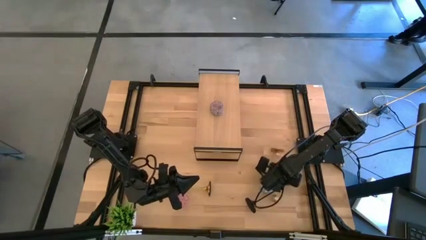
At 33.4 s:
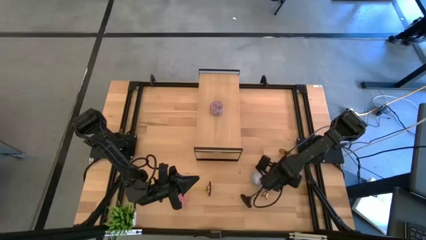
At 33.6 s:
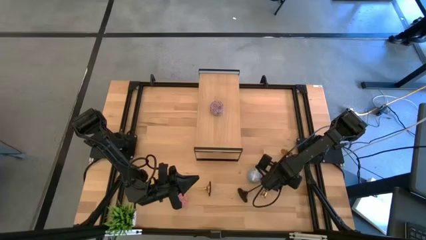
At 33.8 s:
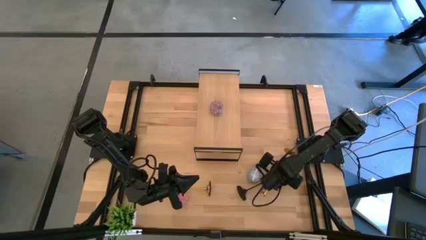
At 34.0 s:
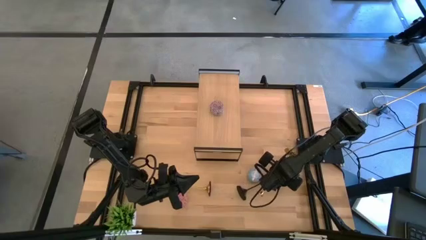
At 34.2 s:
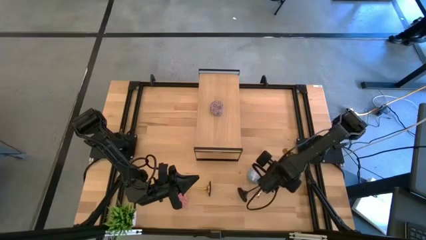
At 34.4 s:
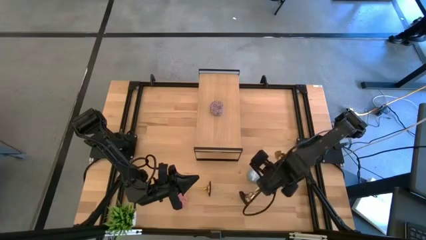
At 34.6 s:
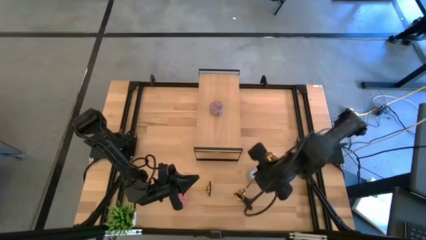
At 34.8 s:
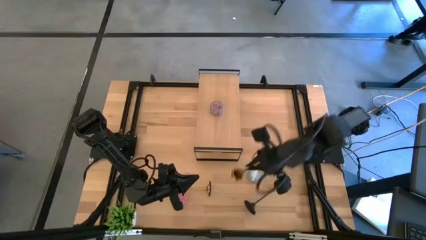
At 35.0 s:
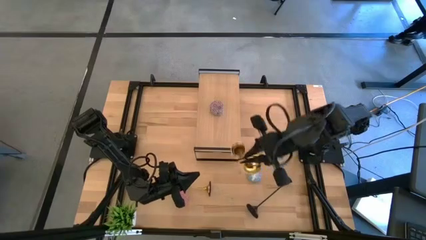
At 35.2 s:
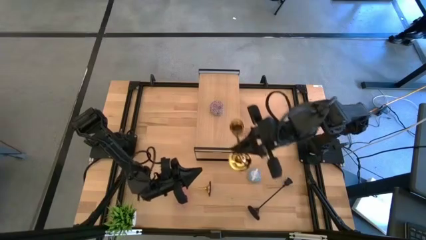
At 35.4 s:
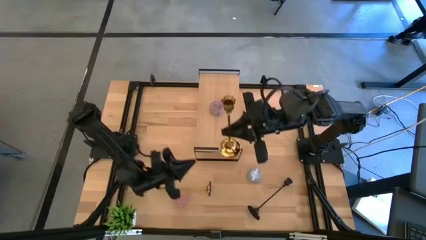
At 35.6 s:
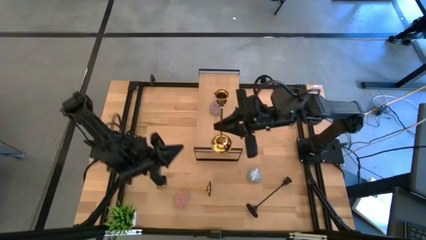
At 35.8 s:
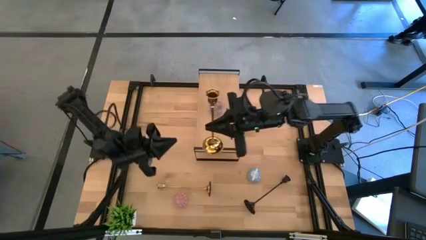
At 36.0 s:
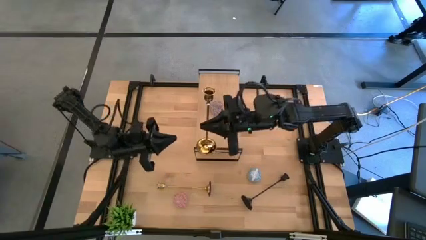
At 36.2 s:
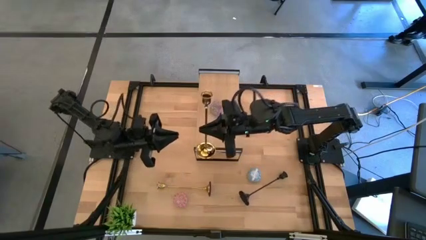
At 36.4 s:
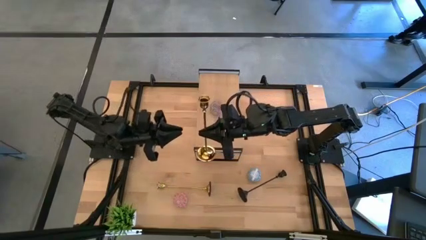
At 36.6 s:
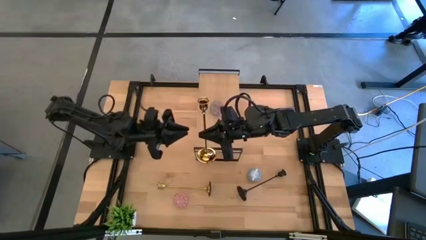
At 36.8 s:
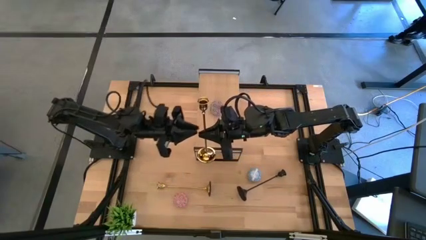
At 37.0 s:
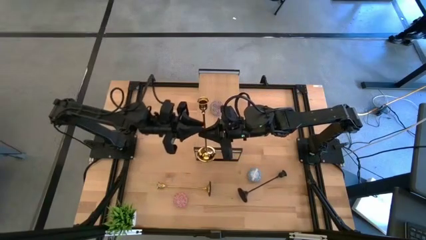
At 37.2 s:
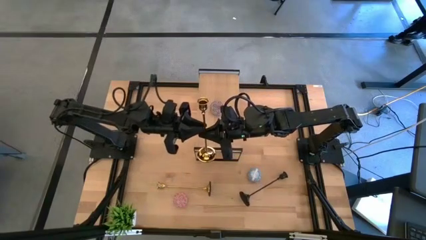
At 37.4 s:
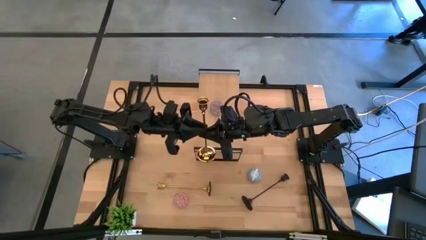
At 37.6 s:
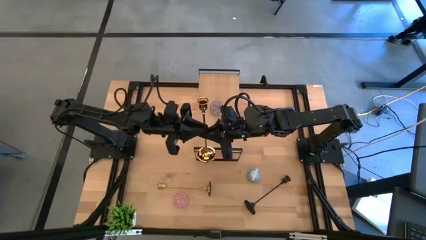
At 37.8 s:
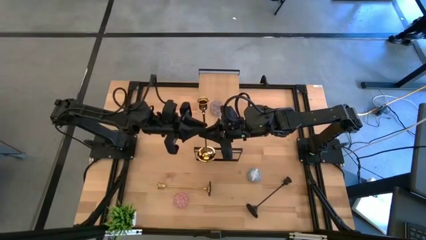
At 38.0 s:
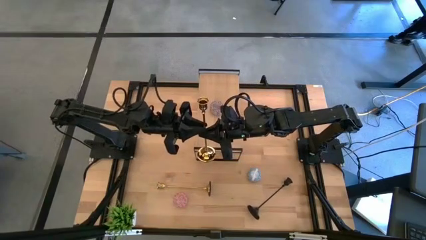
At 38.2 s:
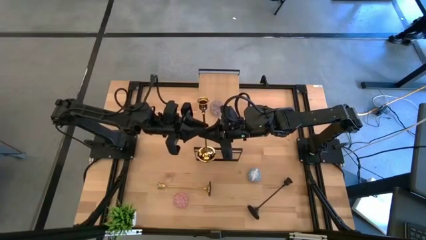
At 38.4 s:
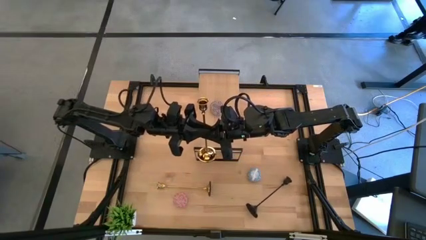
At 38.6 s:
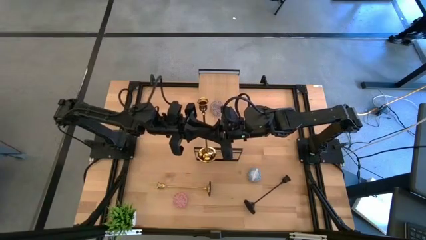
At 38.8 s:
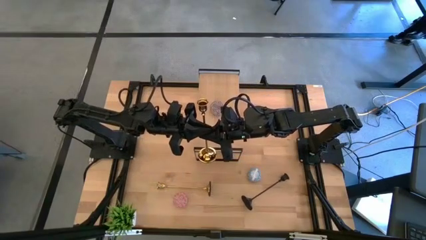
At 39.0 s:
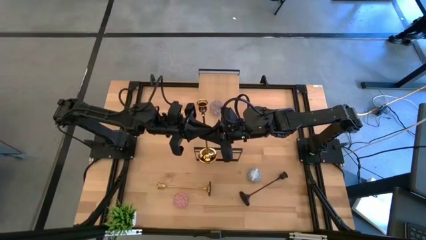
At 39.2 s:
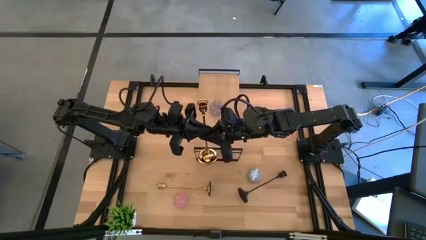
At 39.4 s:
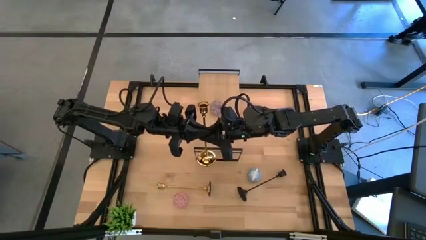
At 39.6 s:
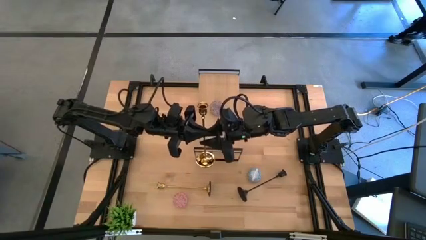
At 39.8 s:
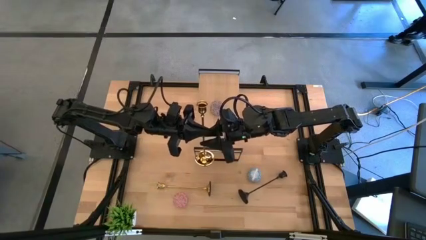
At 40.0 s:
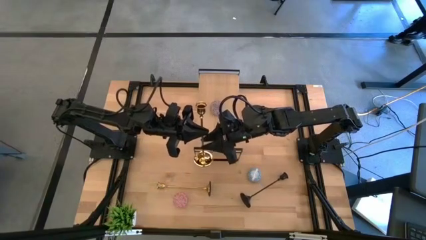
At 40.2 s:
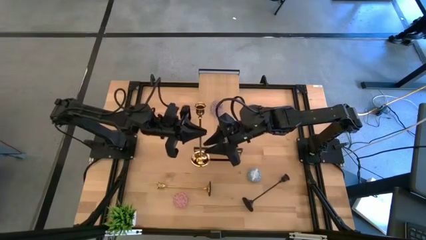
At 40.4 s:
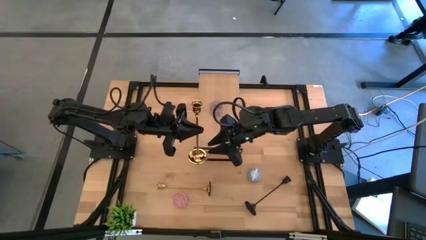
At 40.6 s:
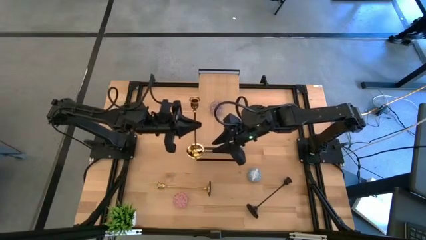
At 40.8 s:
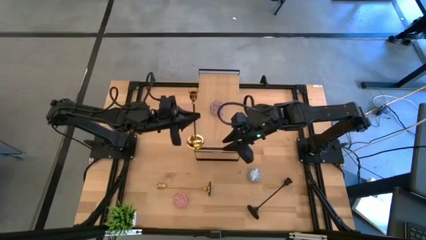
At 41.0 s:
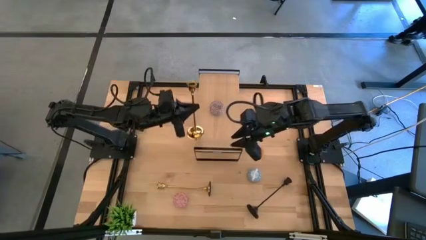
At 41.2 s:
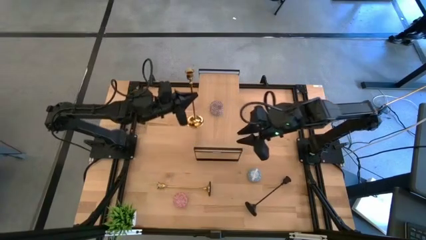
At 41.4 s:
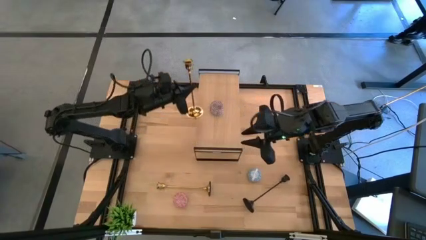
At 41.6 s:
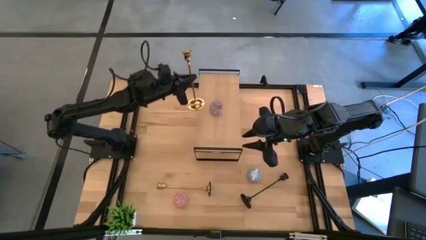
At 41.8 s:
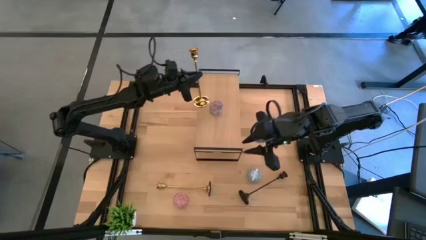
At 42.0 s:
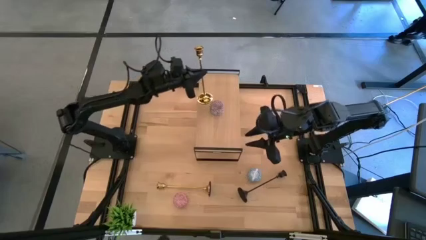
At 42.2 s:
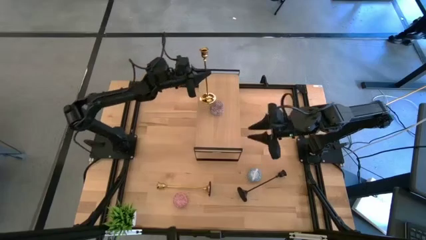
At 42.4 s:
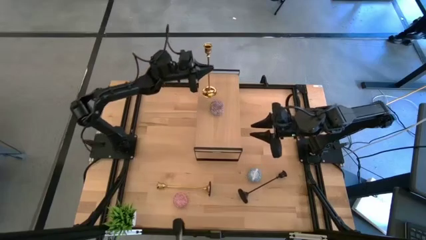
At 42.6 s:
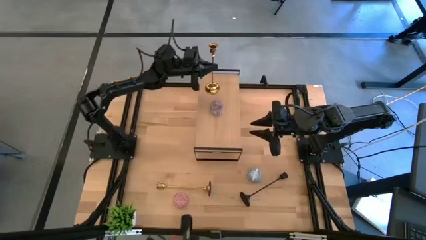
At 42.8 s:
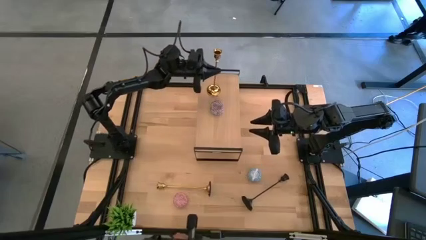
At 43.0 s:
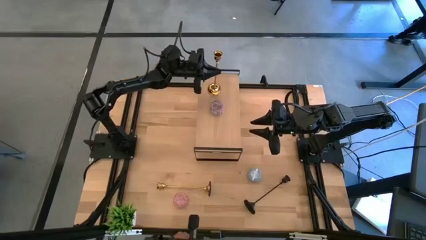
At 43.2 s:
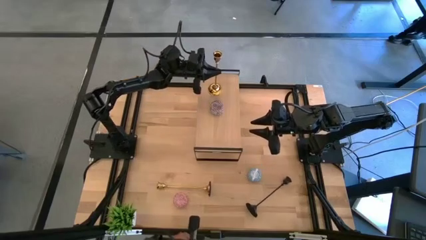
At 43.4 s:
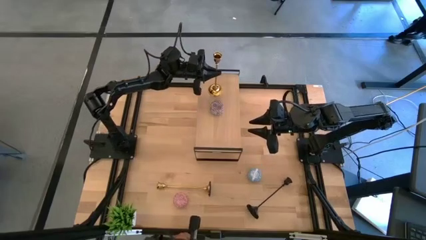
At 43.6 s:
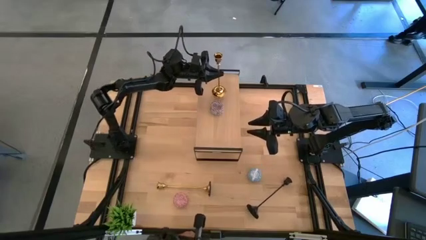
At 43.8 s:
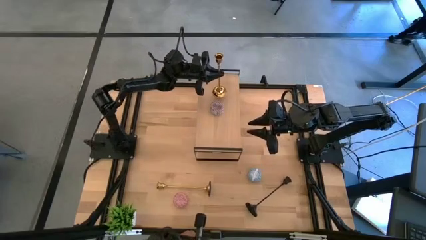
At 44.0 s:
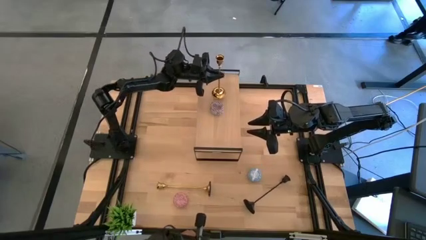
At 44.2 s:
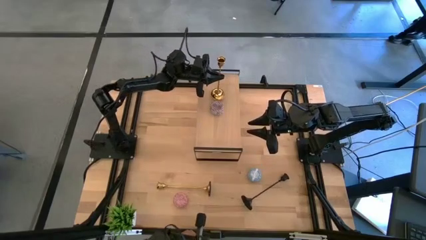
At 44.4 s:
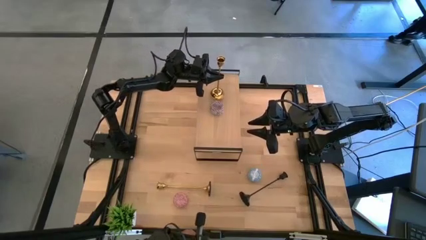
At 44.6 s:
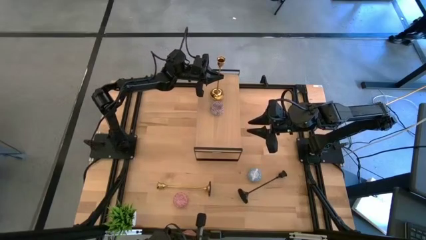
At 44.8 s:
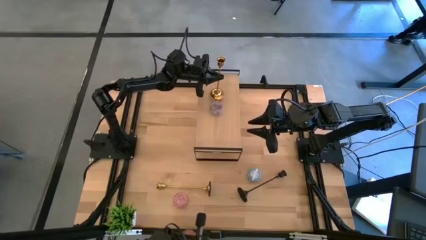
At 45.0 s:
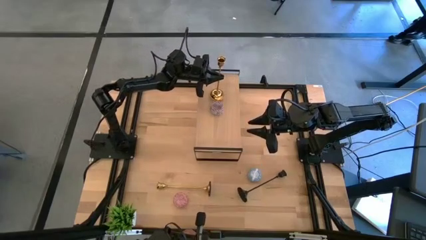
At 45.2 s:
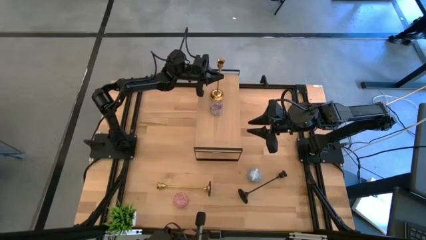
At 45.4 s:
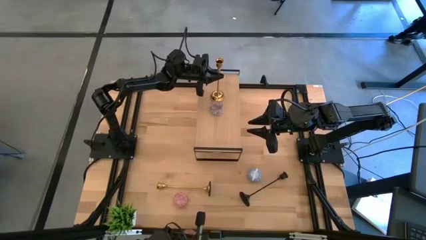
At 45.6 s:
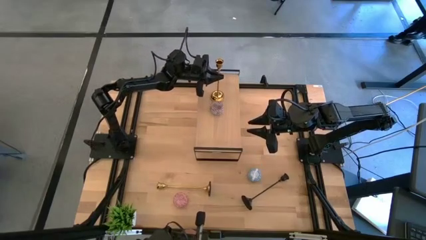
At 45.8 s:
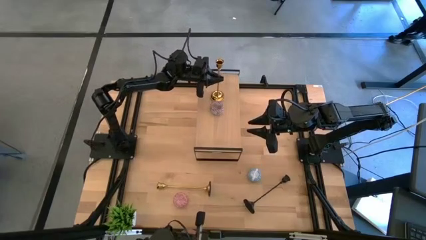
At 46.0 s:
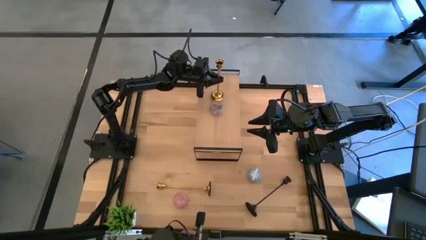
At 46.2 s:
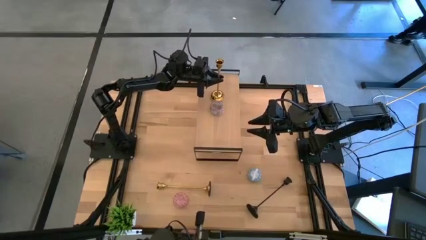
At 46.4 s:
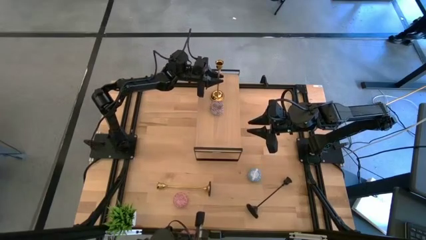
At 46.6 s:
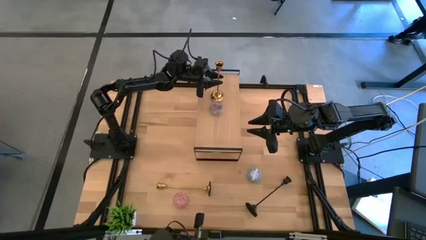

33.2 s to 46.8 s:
Task: Pick & Place candle stick holders
Put the left gold candle holder on the shelf
